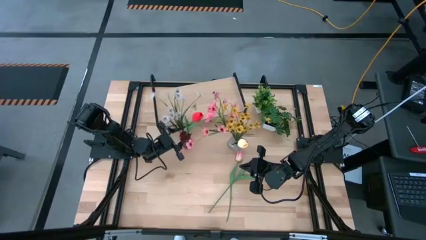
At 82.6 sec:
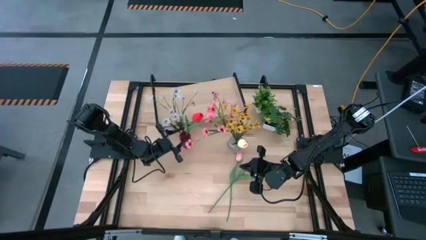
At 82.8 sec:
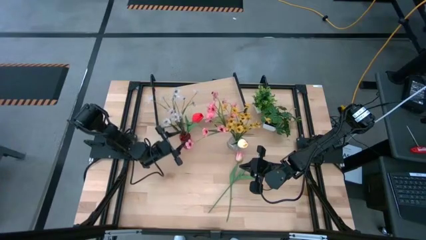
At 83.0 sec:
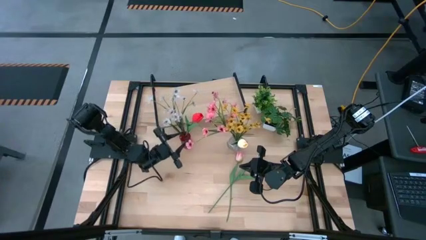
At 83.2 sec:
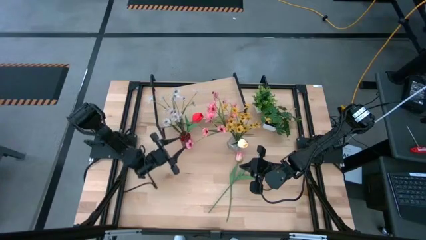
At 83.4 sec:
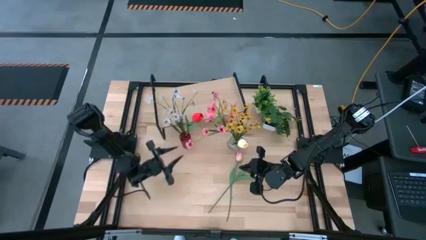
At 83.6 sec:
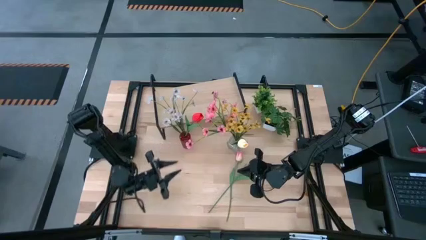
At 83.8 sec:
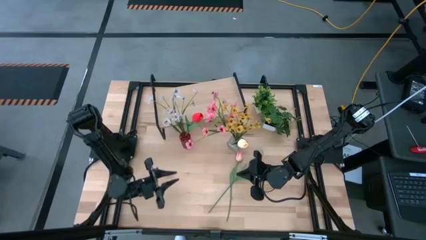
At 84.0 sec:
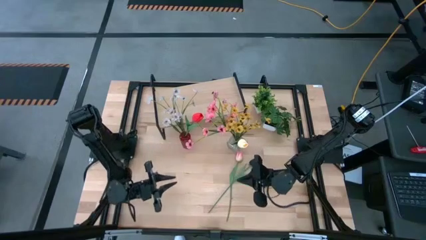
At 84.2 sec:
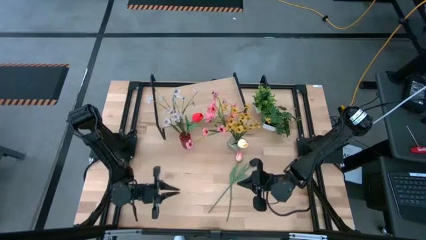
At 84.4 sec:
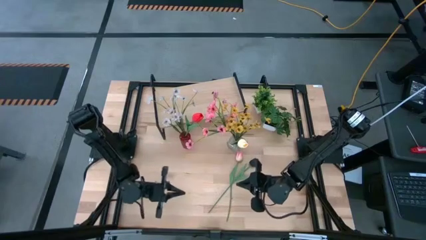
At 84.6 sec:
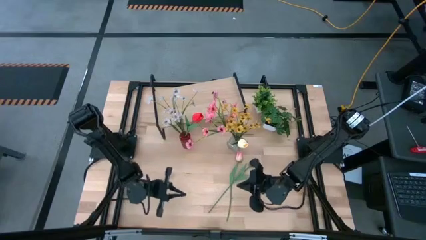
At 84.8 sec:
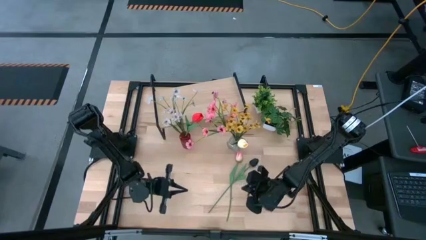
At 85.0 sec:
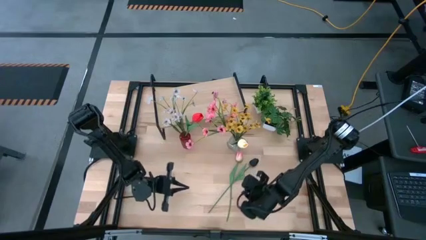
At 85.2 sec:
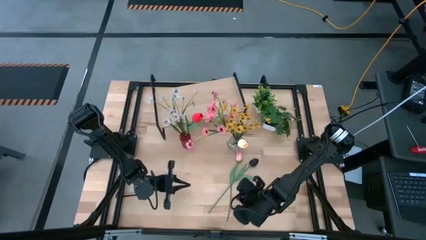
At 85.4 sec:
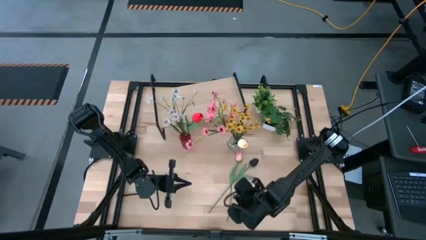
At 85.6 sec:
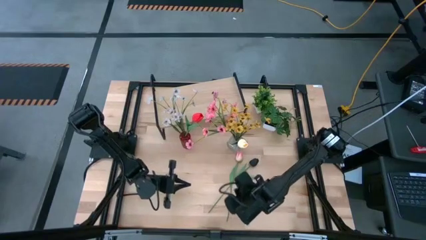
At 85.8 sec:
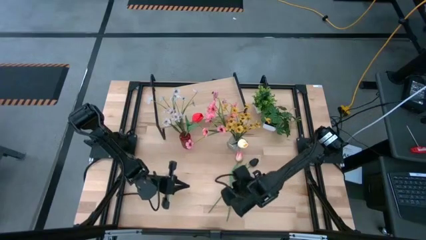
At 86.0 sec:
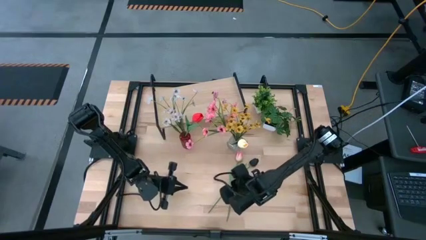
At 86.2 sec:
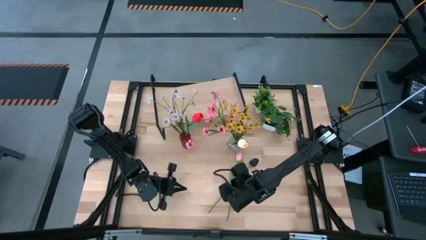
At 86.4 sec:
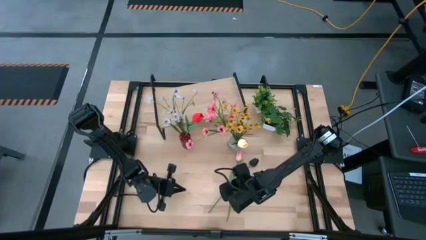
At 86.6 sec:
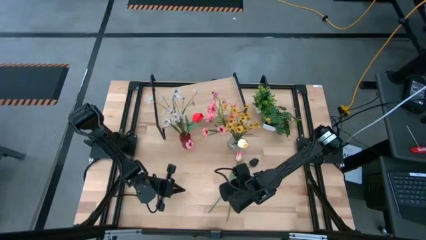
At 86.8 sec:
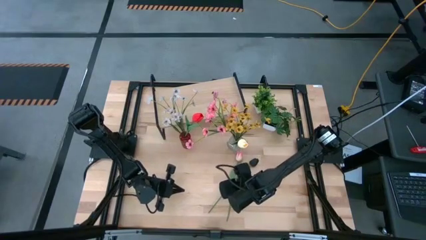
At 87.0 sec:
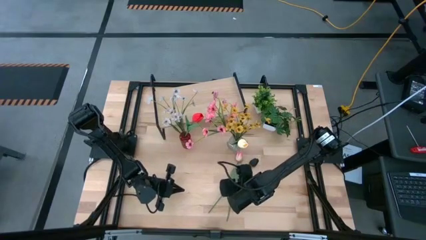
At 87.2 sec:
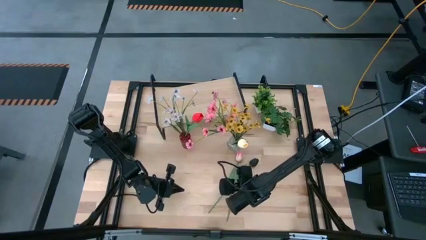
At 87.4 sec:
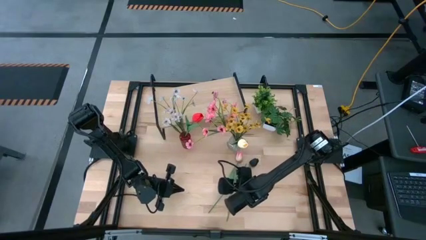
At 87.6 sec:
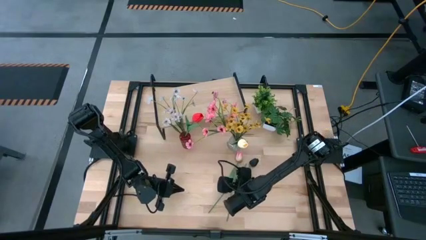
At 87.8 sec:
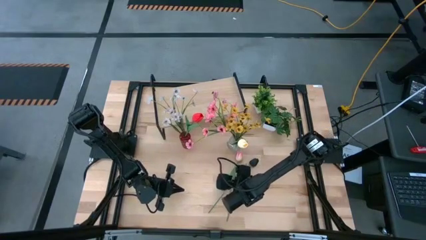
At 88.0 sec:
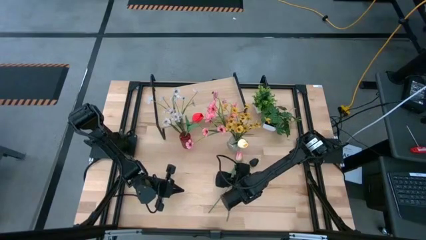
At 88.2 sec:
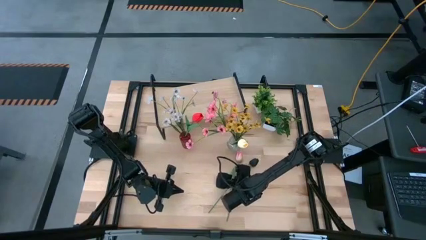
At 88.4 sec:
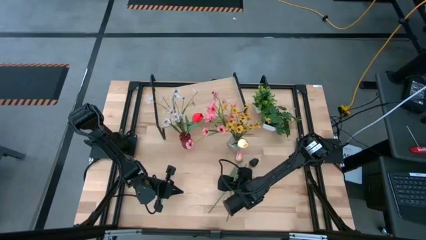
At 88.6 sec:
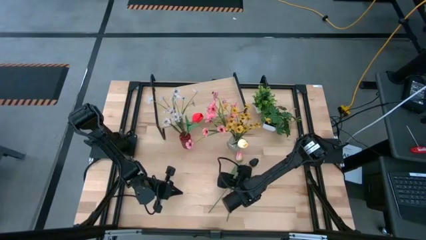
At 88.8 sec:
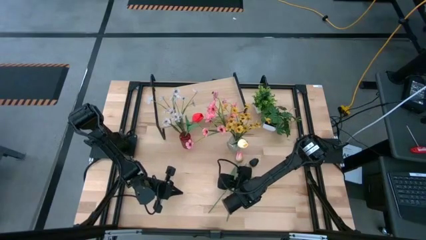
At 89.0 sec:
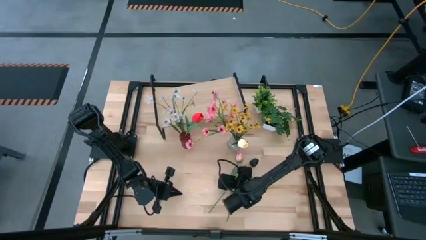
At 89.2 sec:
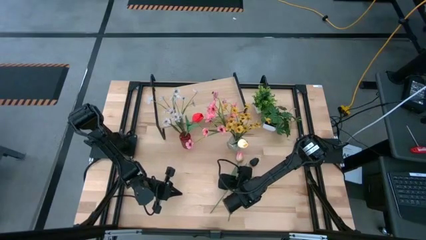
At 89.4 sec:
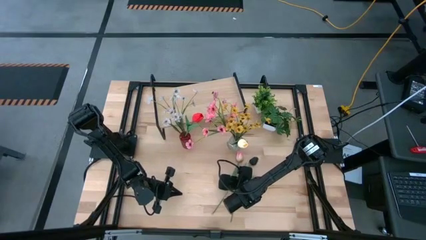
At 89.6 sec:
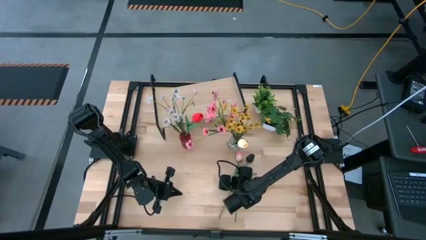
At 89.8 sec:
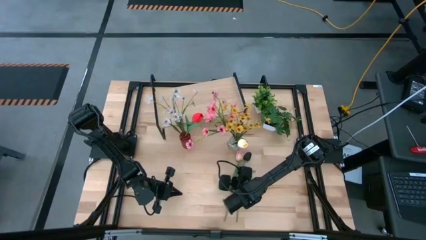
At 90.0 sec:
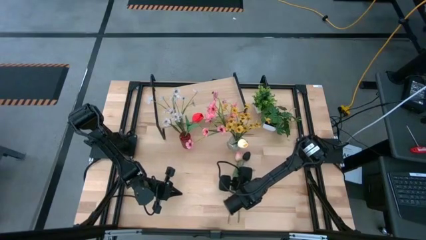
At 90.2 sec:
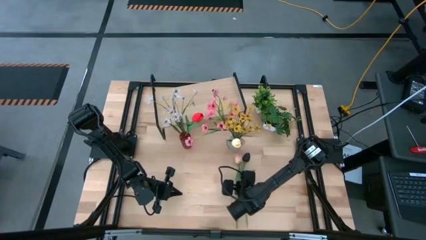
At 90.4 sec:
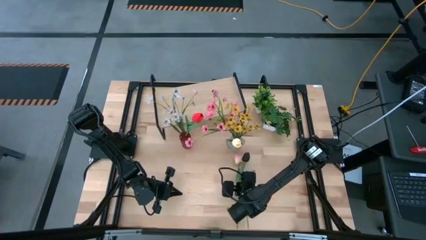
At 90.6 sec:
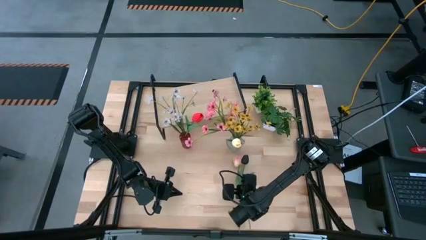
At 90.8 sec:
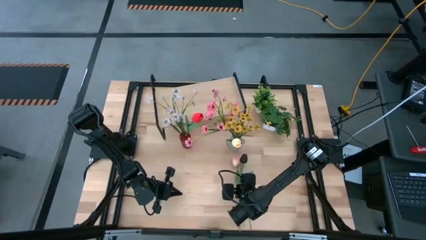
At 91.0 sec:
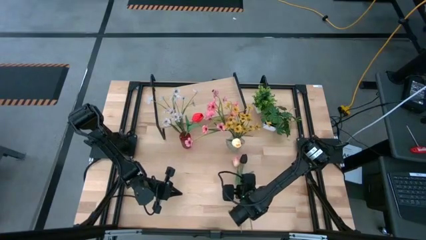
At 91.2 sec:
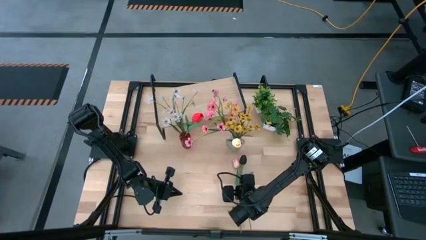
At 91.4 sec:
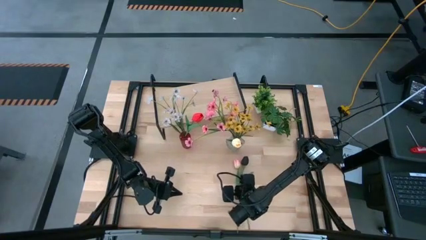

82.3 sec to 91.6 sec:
Task: Pick and place flowers into a vace then onto a shelf
Put the black flower into the red flower vase

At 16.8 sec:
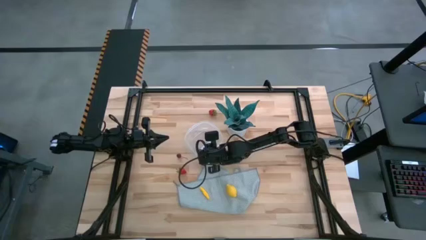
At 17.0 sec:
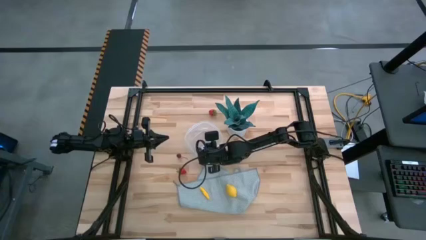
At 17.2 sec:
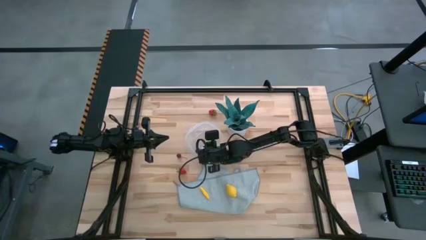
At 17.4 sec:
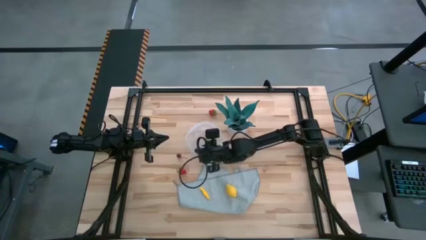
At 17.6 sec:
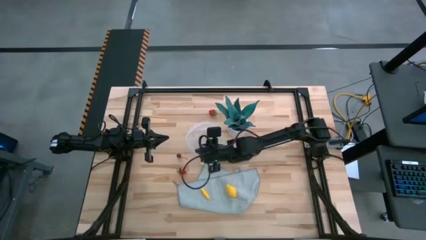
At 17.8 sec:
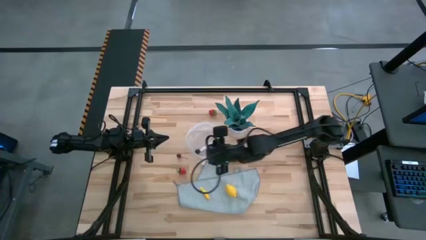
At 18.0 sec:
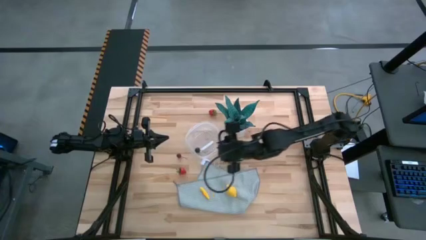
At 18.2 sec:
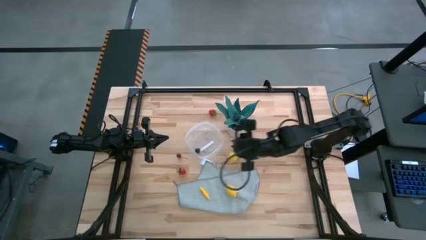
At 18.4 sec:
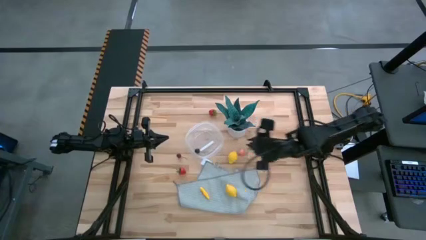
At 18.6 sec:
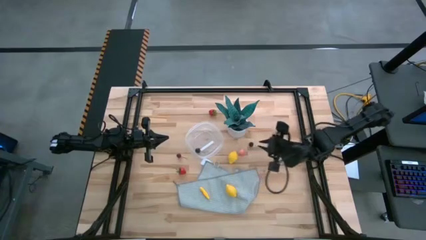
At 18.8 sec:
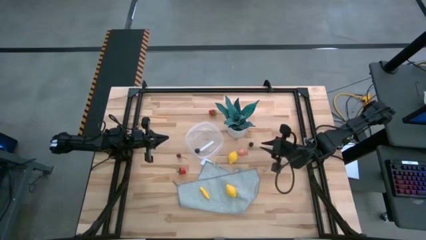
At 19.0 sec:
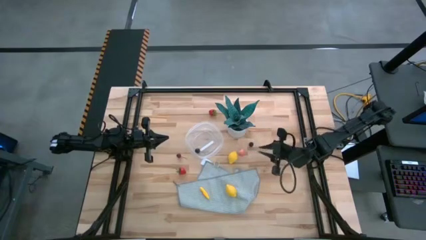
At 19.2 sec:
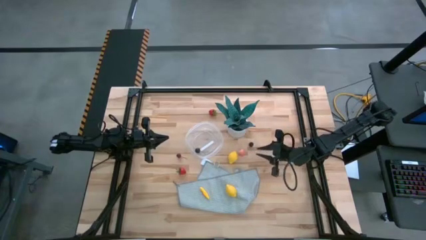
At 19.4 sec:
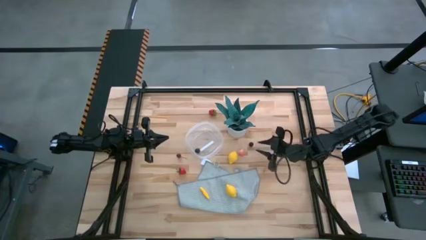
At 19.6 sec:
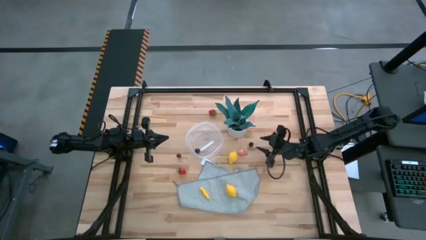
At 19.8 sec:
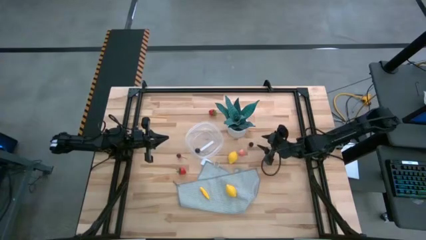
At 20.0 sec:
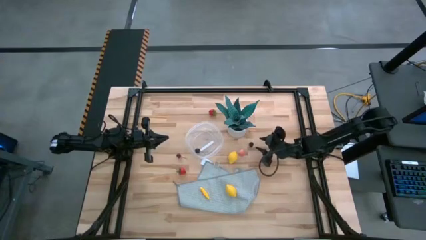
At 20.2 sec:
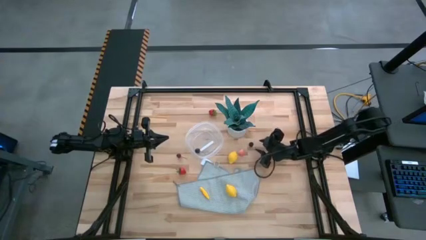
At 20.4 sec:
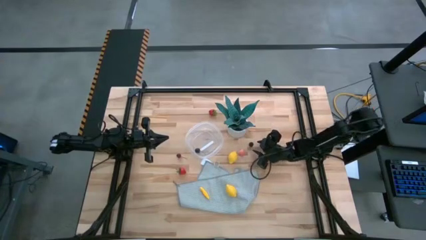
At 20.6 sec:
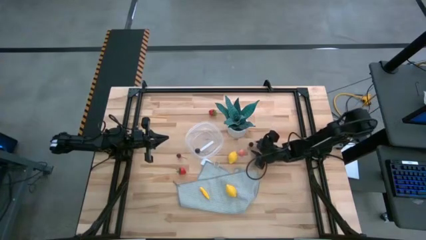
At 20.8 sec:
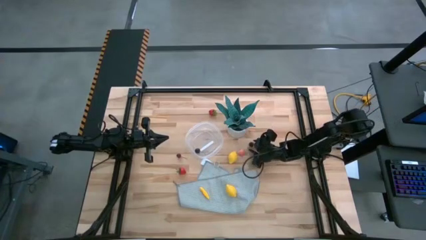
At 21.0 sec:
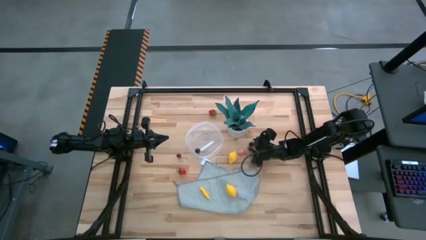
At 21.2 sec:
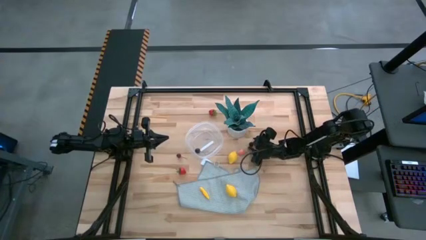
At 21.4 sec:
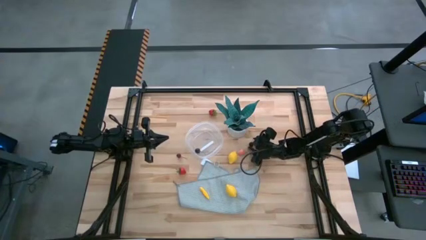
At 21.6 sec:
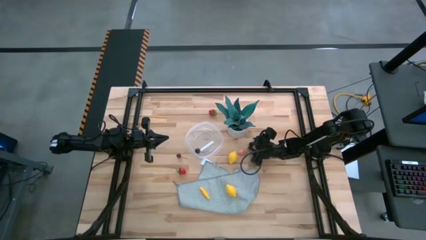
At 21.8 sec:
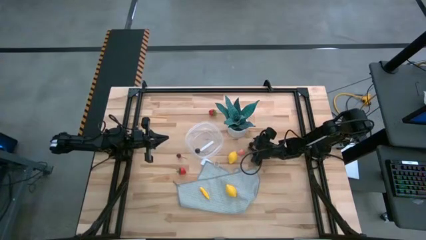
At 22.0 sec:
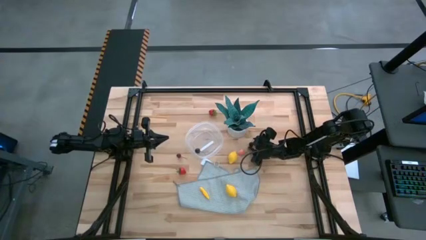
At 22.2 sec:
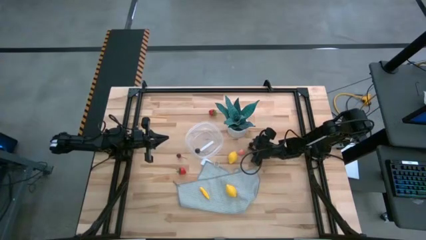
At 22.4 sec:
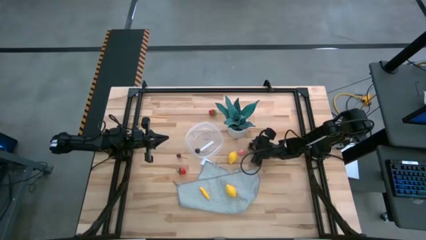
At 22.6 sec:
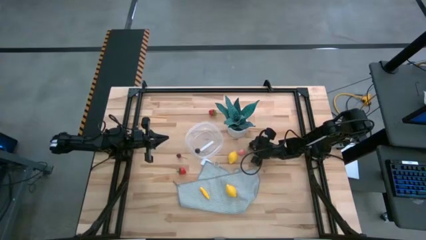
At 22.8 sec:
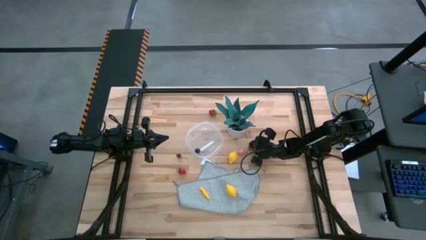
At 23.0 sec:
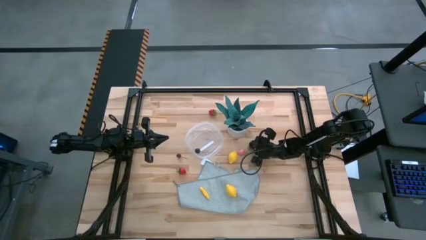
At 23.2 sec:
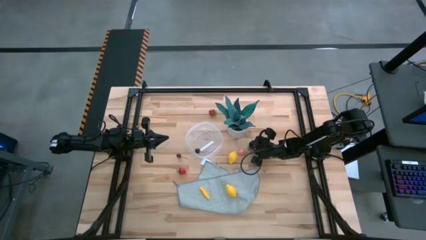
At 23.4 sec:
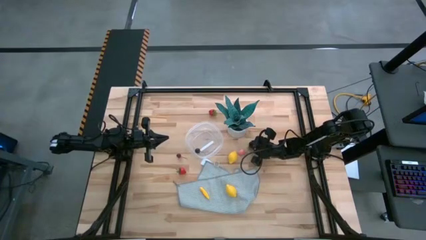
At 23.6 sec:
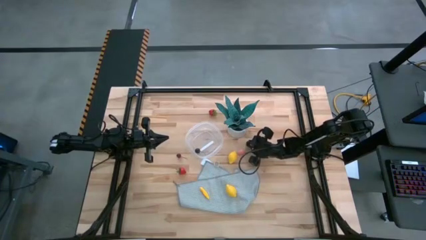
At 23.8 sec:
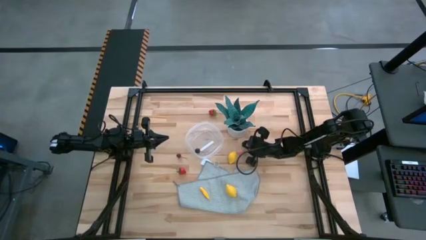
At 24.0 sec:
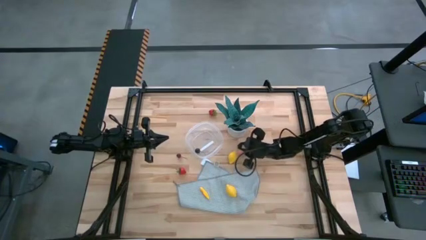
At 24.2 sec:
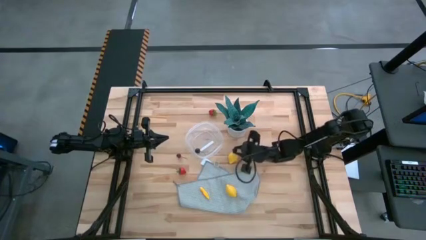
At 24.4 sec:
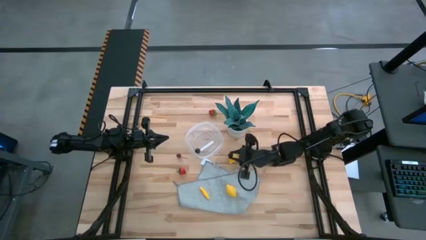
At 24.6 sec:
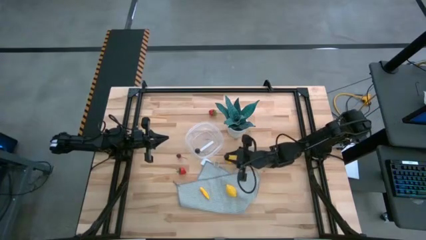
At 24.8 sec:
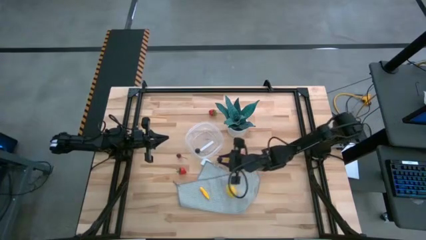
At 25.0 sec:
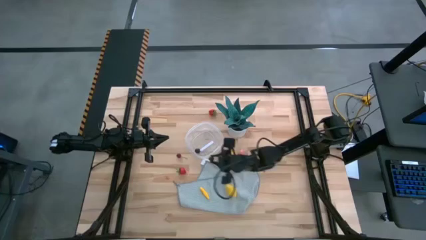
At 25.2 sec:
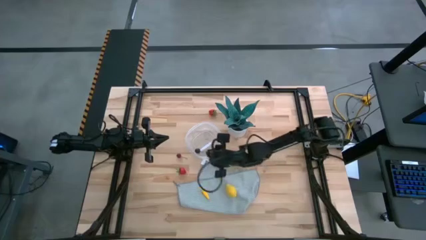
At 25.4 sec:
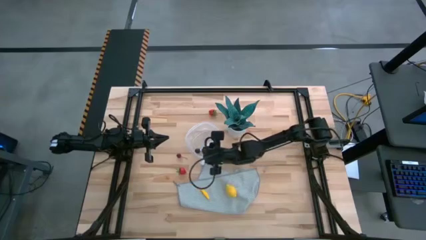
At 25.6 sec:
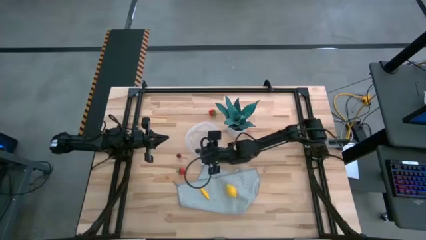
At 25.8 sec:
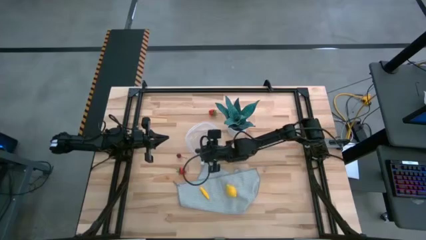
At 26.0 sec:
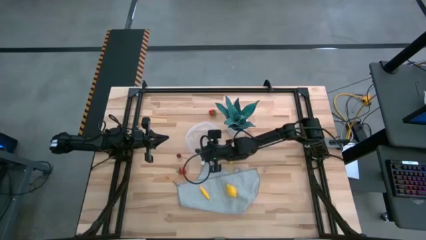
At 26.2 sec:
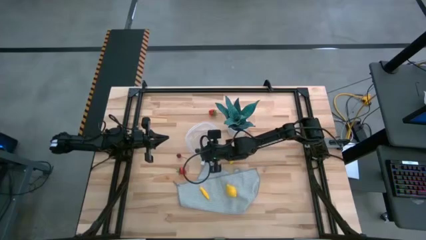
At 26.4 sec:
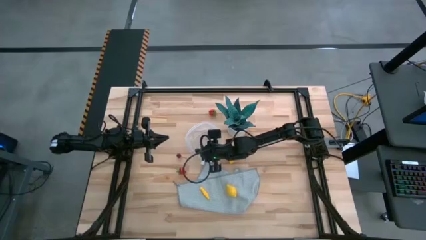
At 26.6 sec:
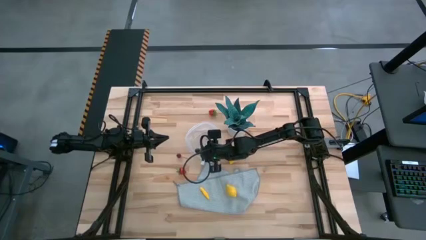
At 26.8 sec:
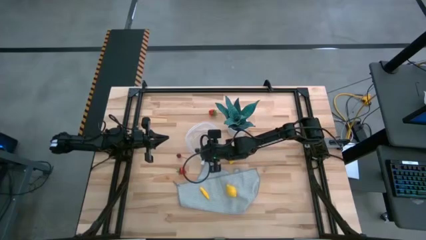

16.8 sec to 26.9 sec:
Task: Pick and placing Produce into tupperware
Put the blackberry into the container
